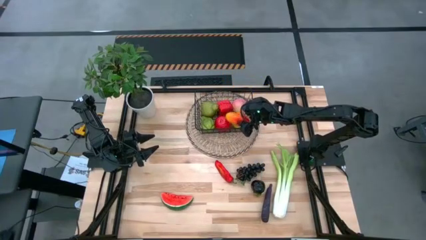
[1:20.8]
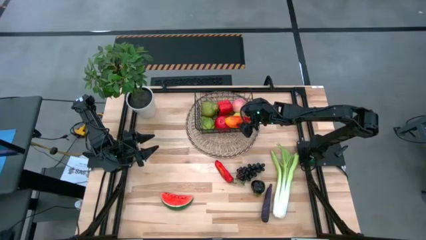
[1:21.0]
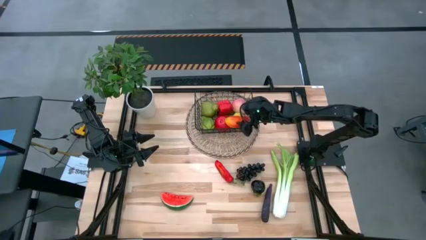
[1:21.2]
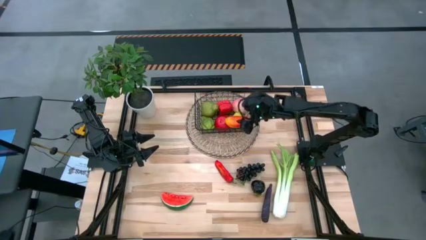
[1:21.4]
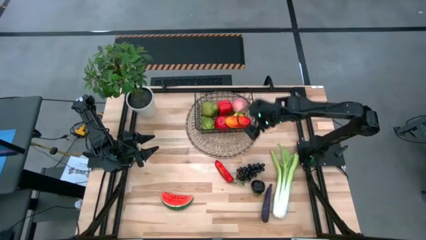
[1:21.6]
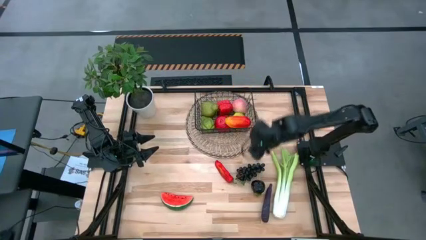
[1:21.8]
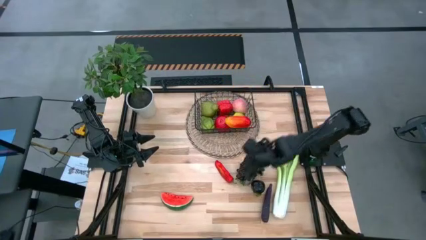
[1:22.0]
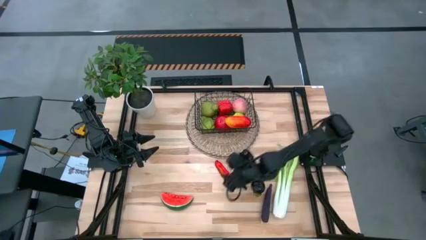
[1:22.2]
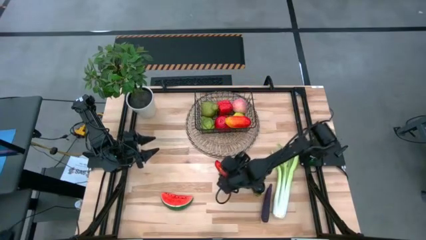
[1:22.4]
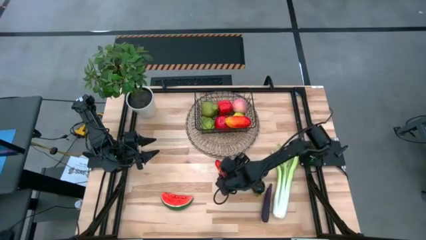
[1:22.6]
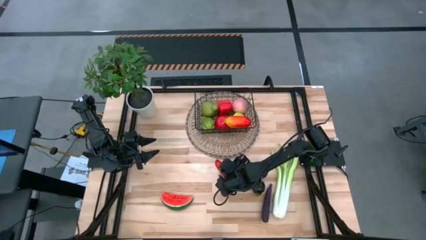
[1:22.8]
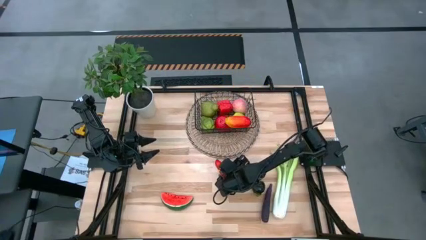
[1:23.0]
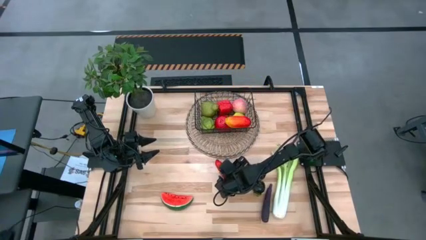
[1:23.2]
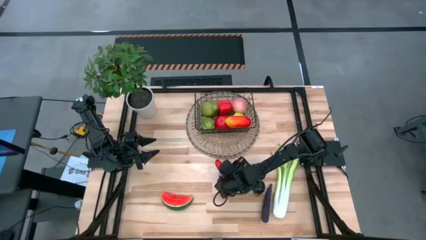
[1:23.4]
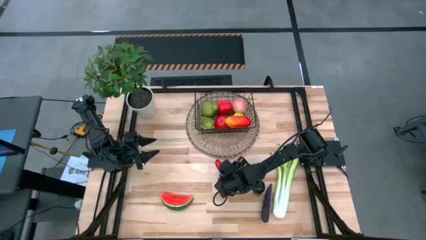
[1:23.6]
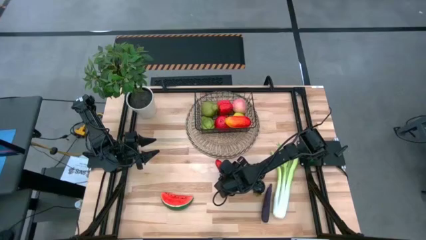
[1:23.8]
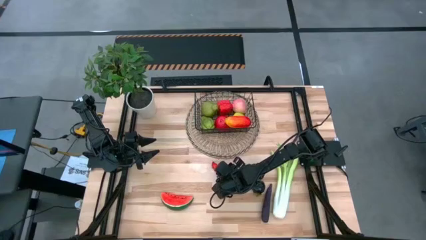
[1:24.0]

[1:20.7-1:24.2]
Task: Build produce basket
Put the red chili pepper into the black wire basket

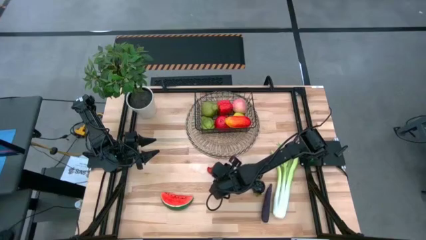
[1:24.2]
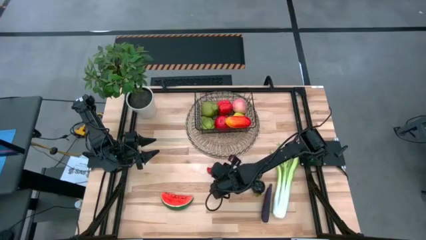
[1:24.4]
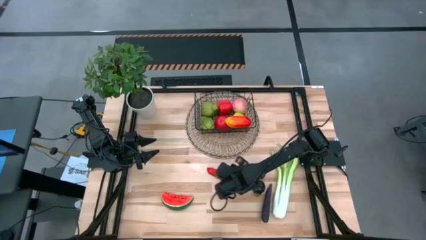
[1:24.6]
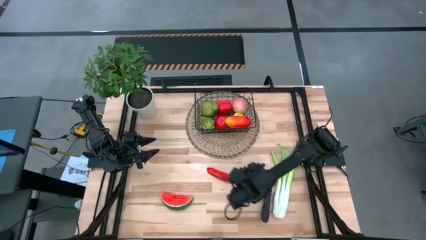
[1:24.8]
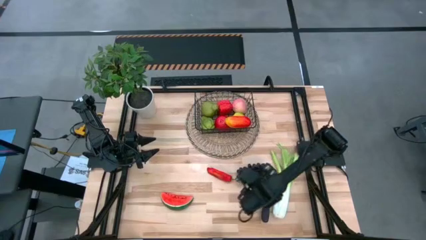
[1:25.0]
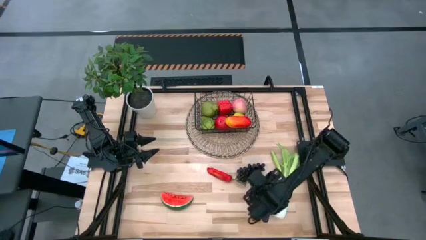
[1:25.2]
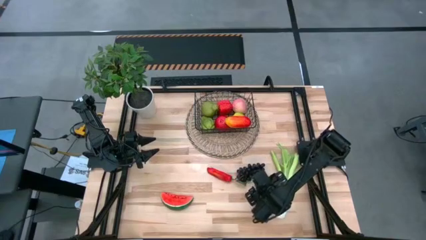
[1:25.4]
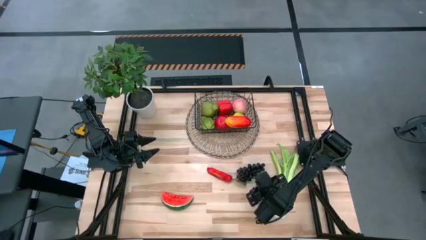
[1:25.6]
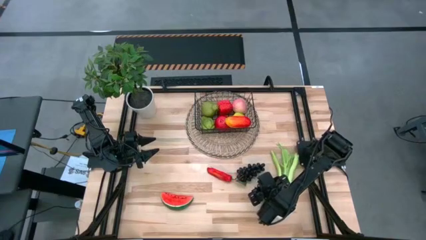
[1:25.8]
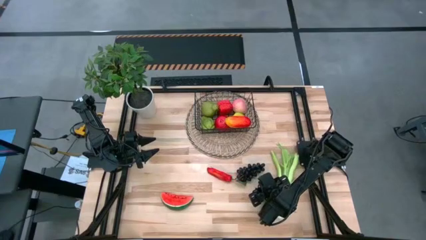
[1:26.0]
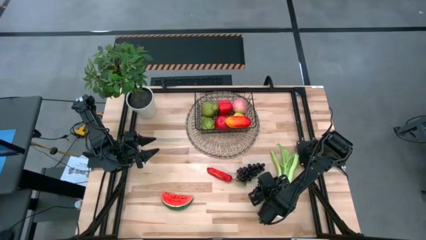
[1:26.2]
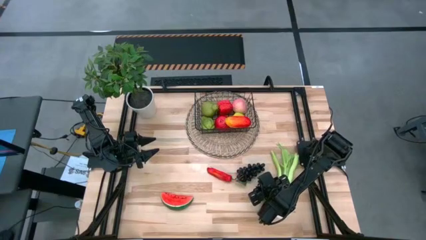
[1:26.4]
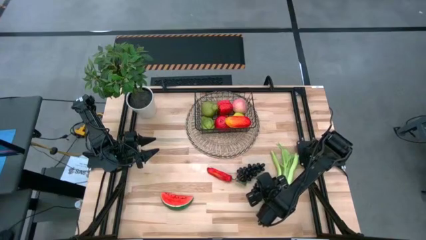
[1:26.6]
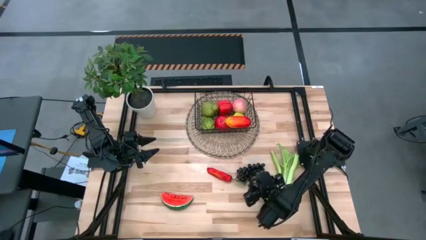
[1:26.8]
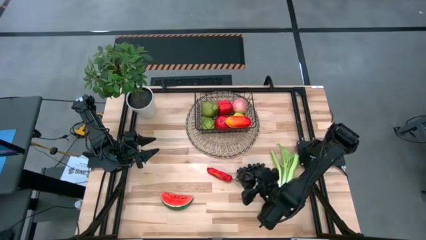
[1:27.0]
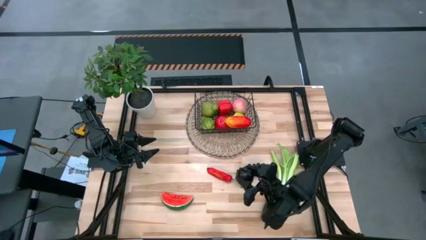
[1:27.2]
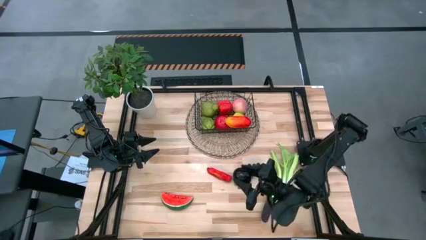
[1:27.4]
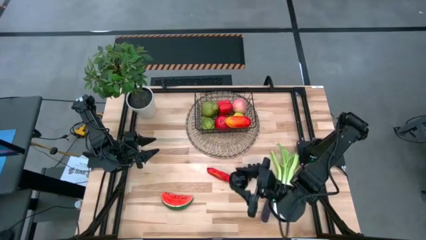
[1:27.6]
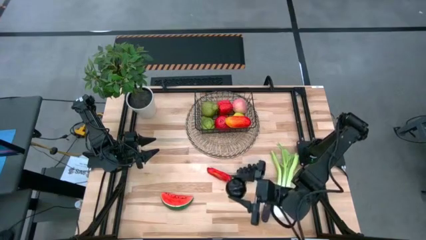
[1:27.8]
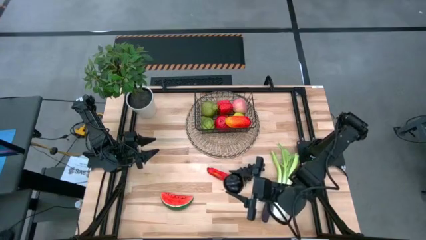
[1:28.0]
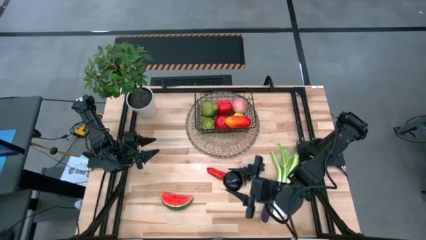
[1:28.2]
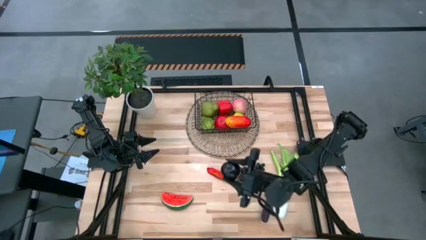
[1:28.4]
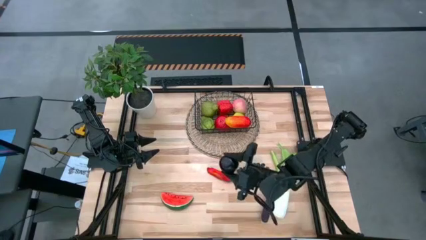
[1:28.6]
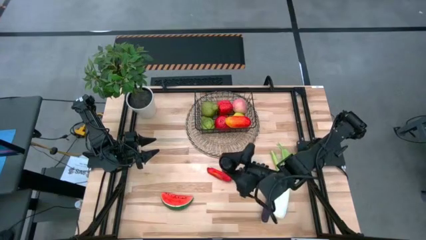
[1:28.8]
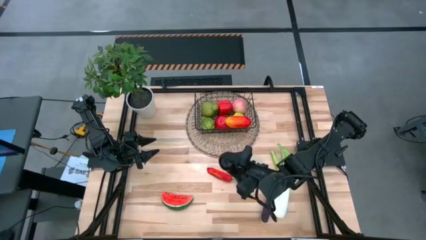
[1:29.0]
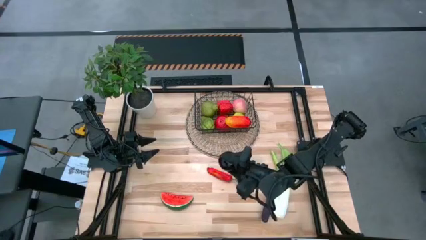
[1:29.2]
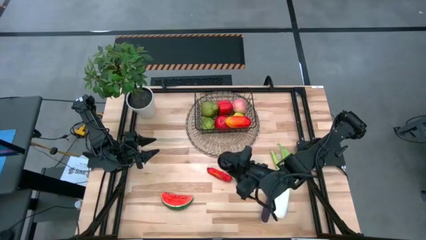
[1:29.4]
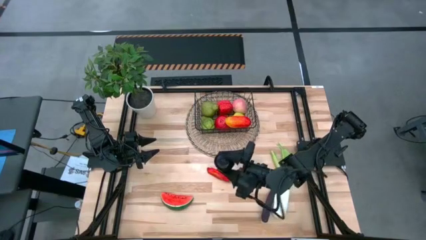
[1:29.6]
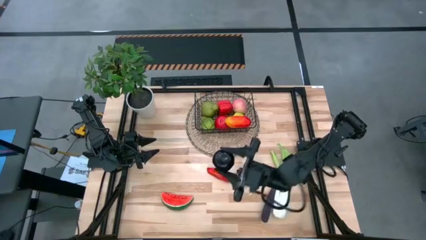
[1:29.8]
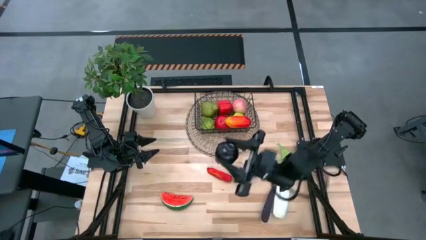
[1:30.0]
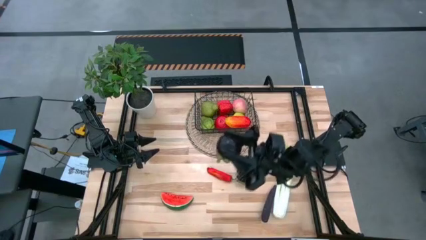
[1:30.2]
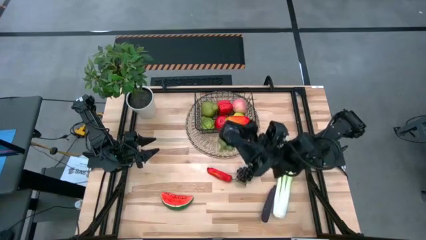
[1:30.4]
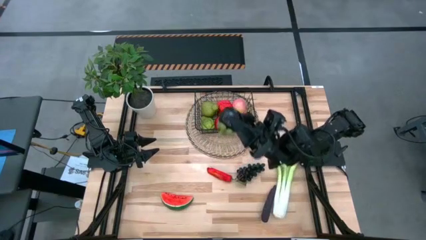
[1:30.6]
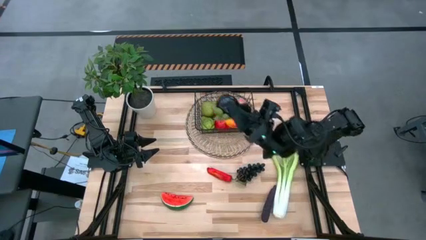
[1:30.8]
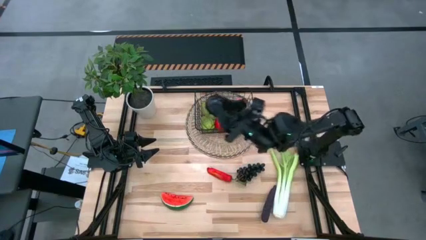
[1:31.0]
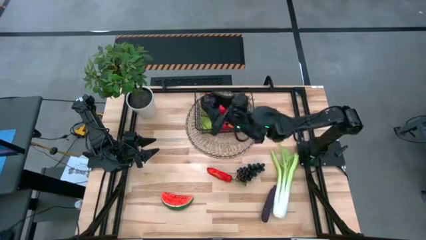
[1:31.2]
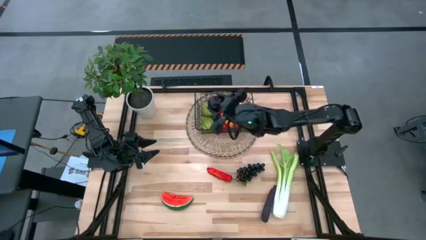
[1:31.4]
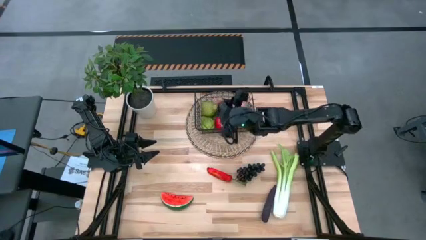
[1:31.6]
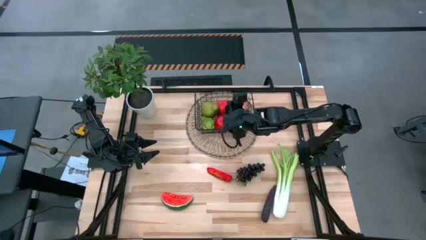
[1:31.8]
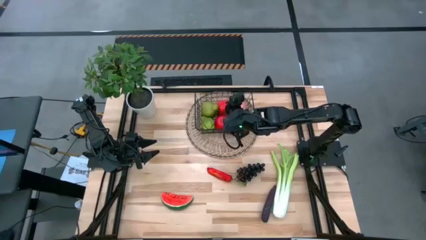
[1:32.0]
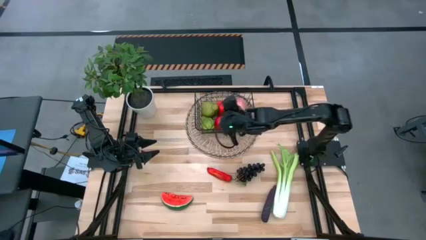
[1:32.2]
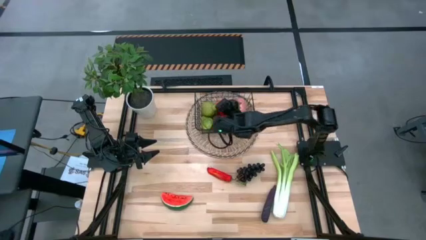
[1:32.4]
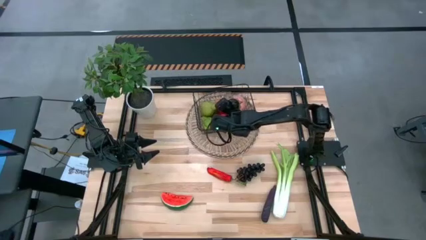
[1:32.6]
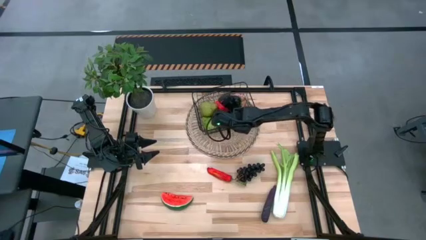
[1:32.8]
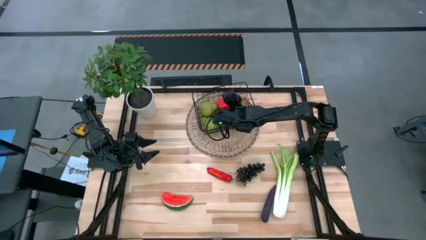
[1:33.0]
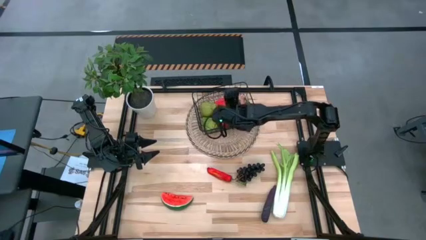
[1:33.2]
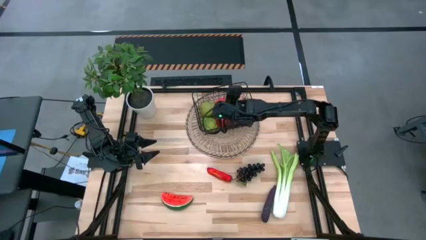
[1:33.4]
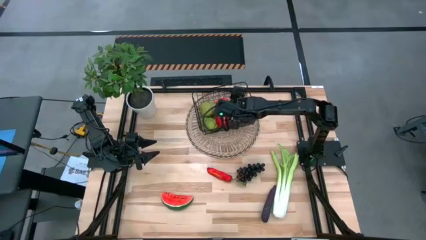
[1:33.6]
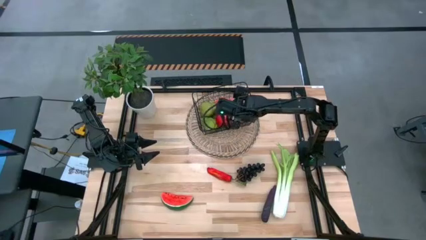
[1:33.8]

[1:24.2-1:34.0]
Put the purple mangosteen into the black wire basket

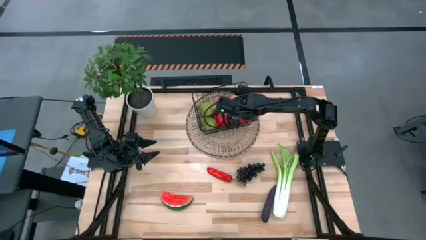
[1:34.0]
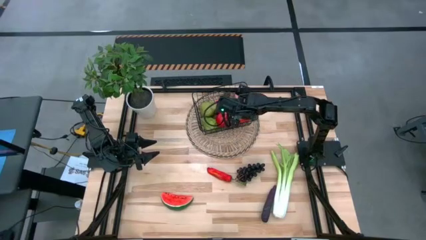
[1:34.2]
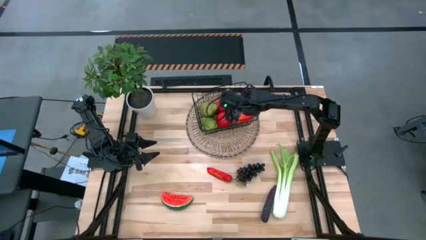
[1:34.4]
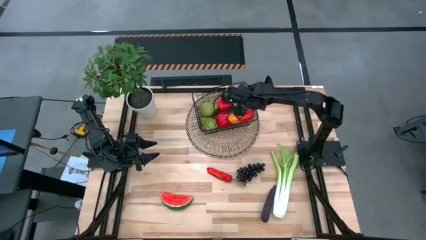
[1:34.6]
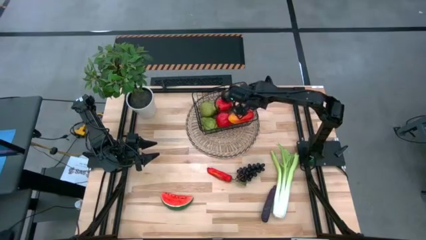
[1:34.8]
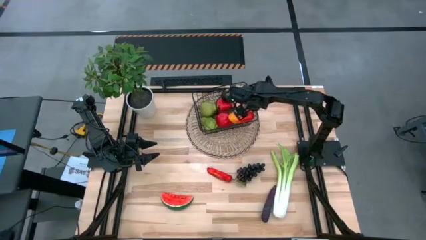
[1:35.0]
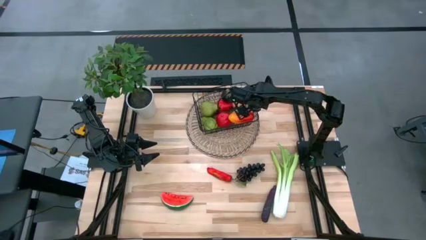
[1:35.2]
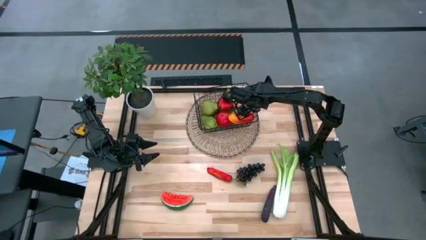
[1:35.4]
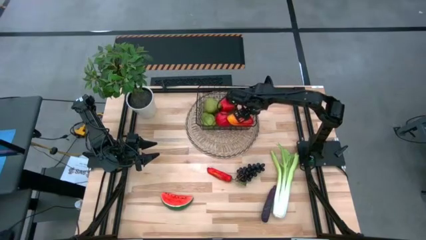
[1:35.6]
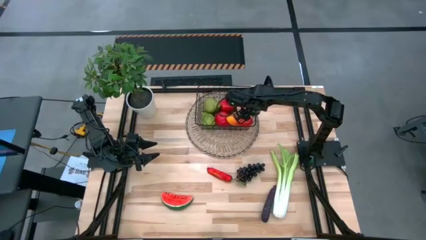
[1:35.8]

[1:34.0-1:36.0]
Adjust the black wire basket
